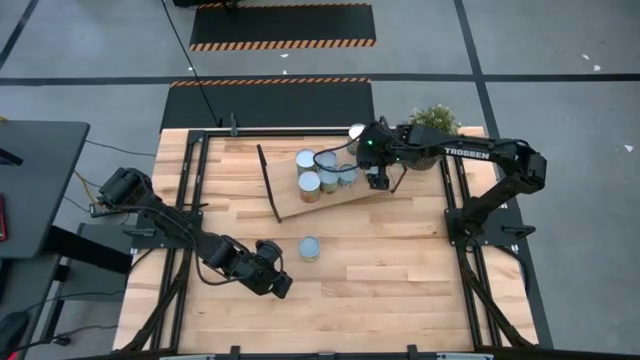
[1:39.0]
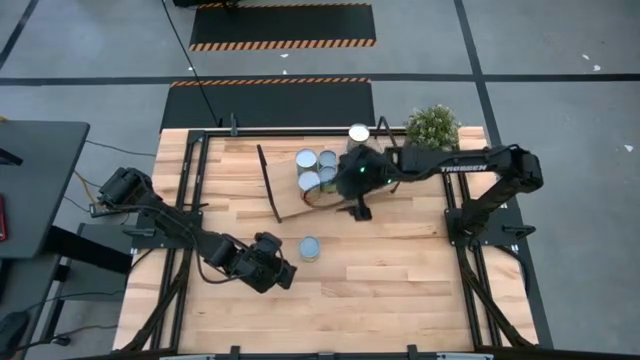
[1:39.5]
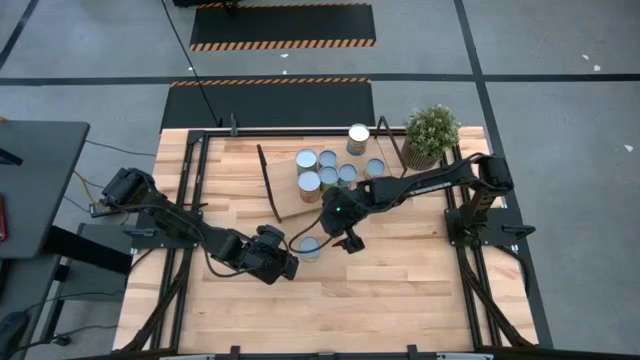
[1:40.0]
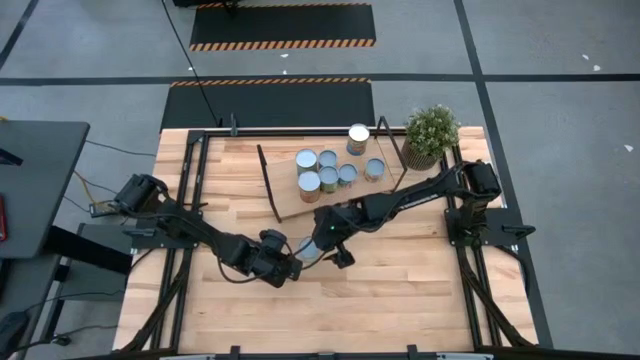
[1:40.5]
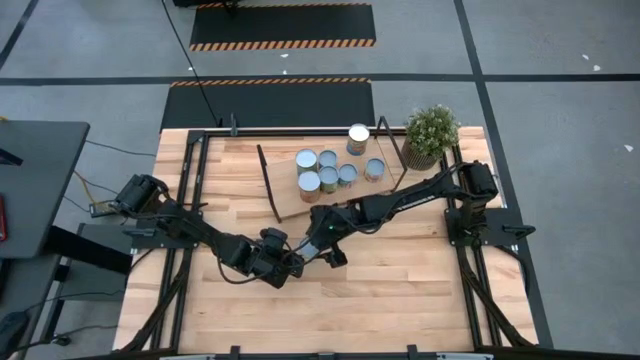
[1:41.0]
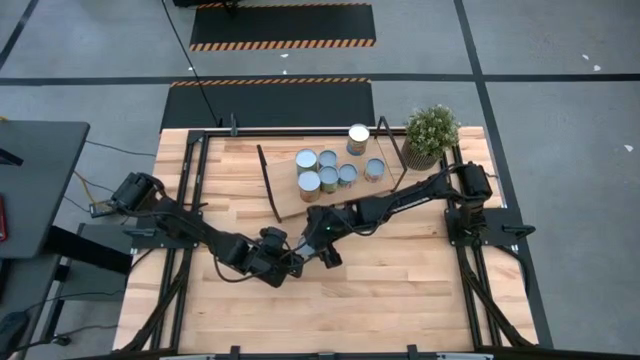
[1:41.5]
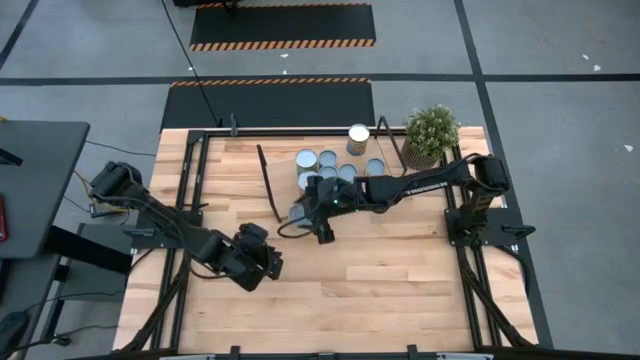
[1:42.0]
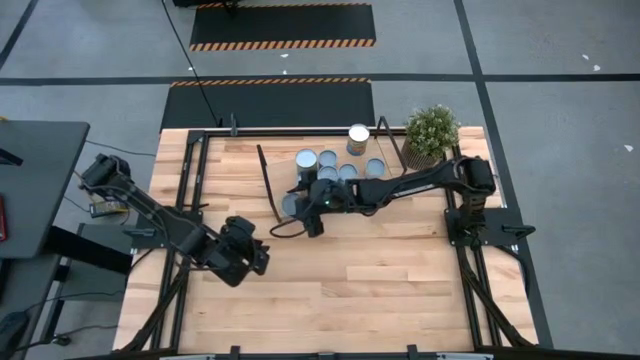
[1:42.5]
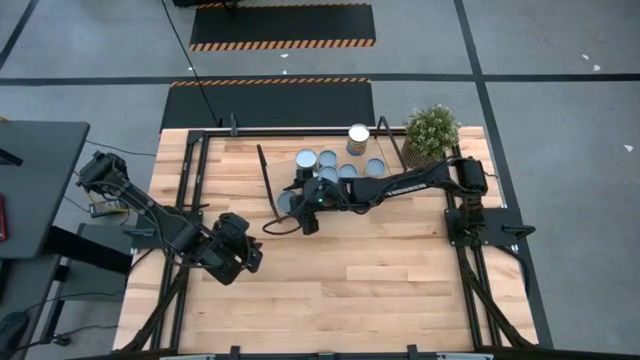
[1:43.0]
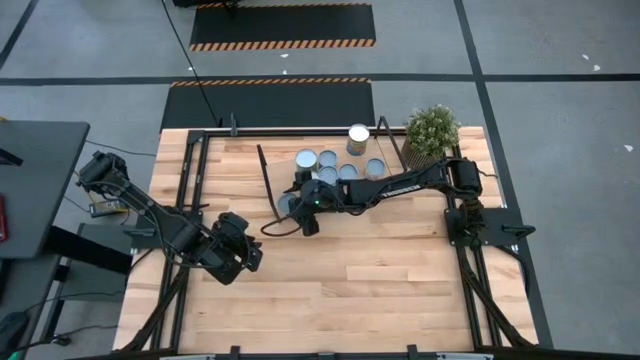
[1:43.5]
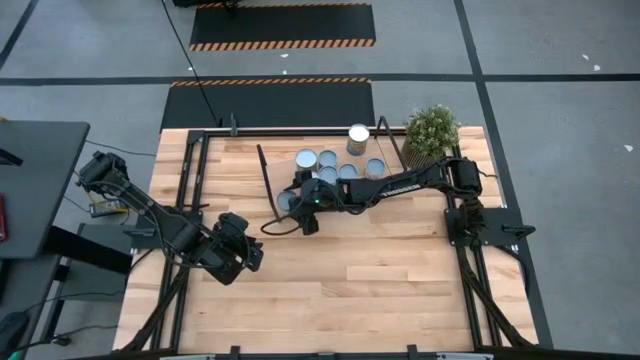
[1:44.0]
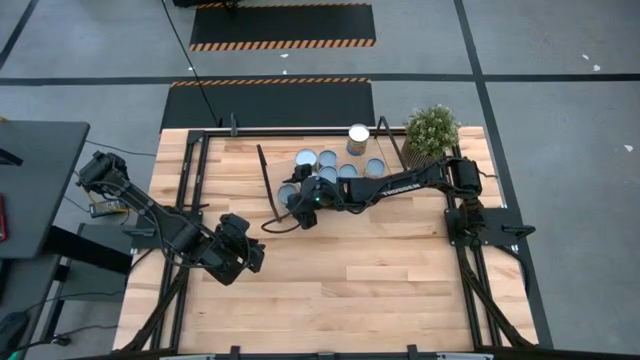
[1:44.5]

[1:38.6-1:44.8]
Task: Pick and place cans onto a shelf
Put the green can on the shelf

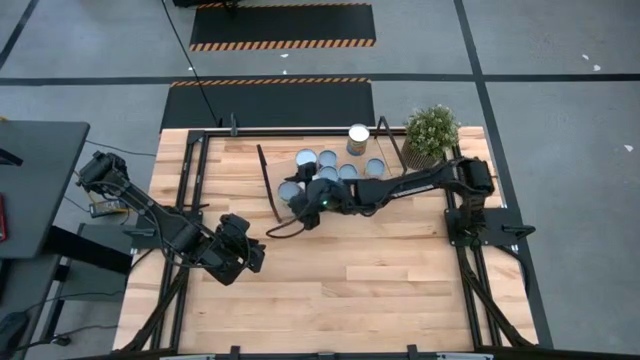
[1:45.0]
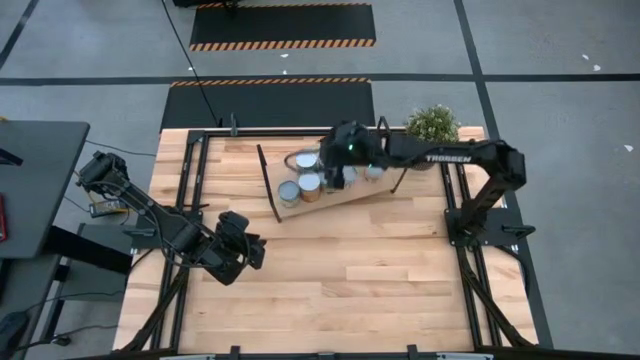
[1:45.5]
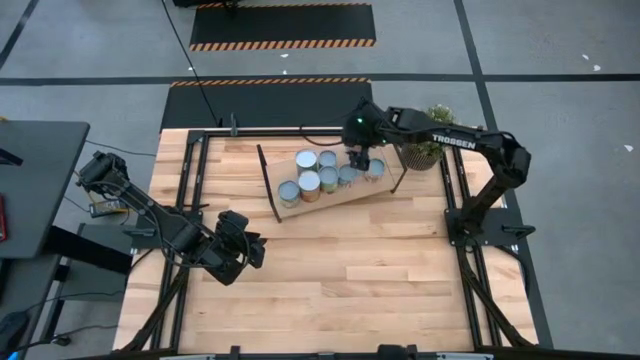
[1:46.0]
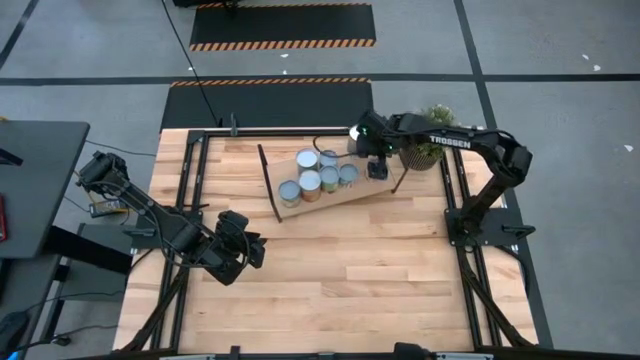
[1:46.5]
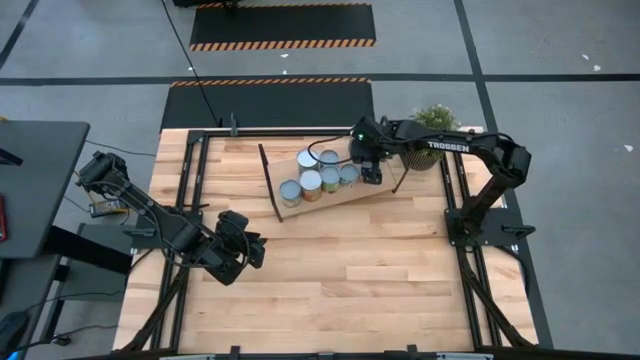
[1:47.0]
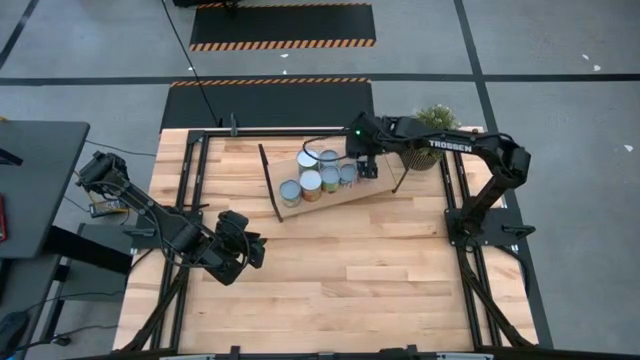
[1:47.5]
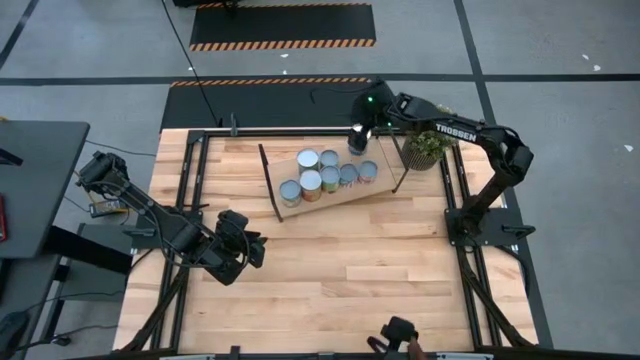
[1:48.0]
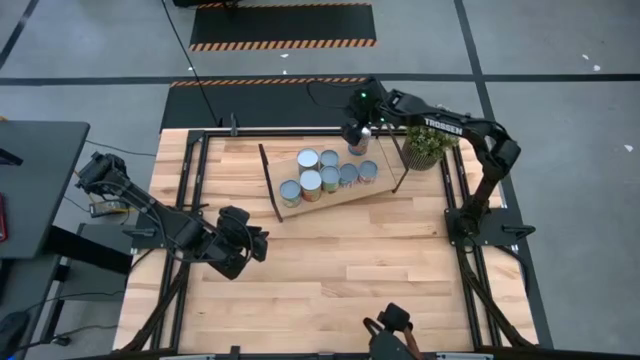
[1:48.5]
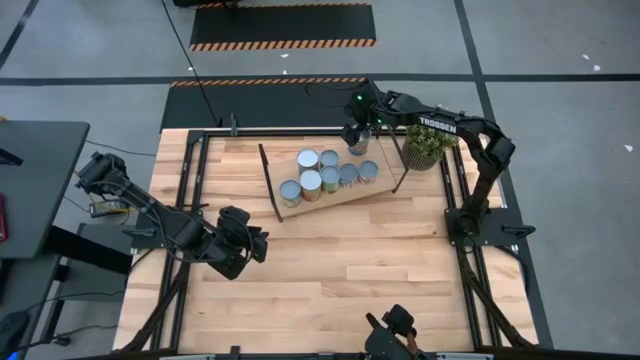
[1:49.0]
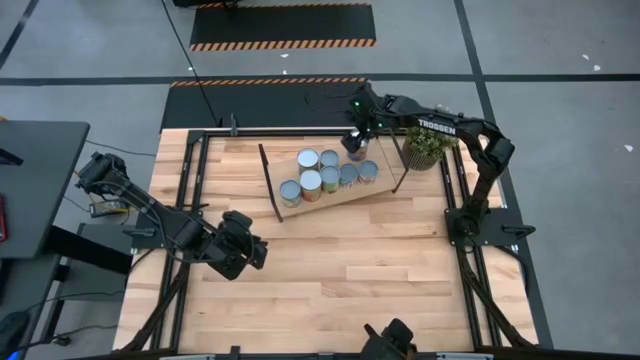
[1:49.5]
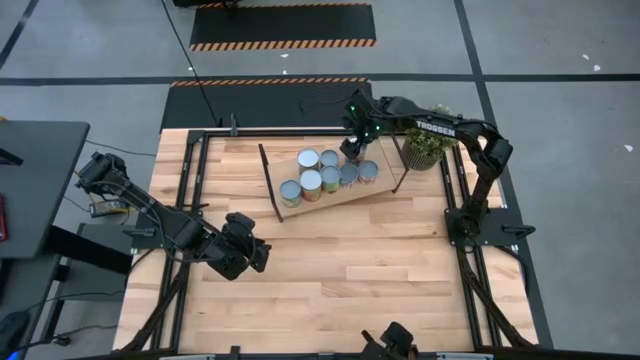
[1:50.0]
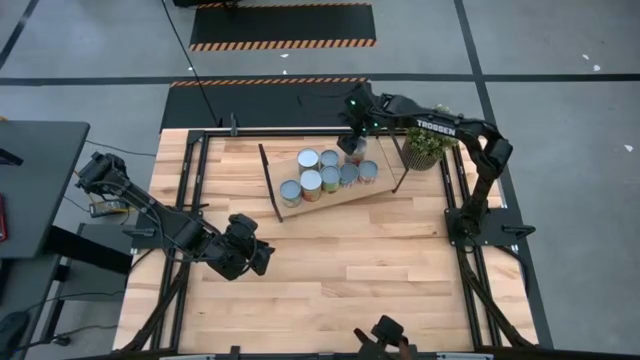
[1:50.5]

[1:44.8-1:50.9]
Adjust the cans on the shelf

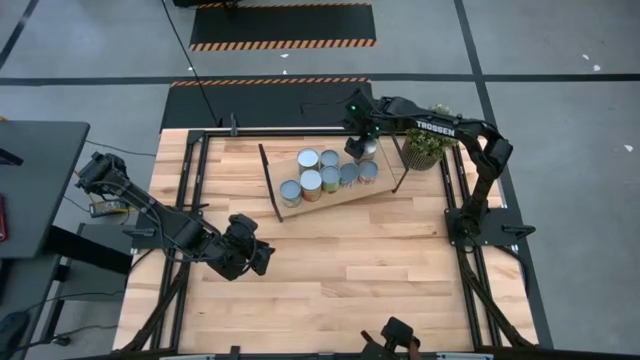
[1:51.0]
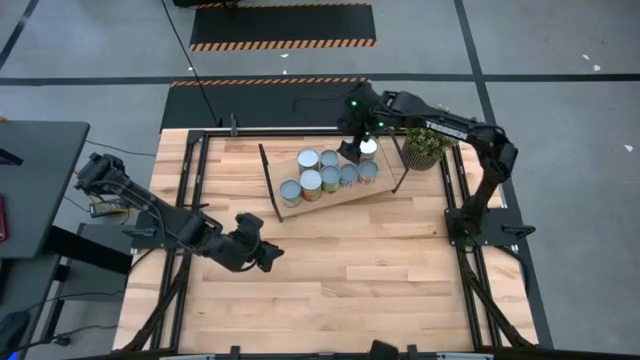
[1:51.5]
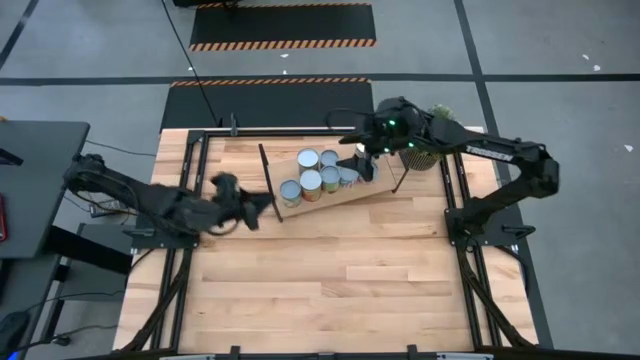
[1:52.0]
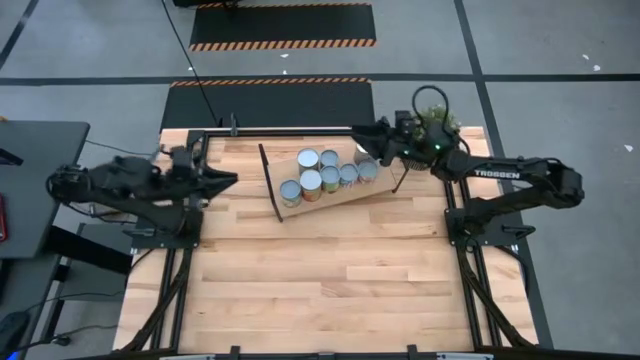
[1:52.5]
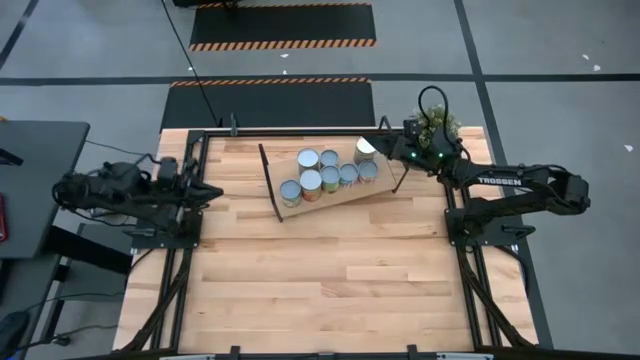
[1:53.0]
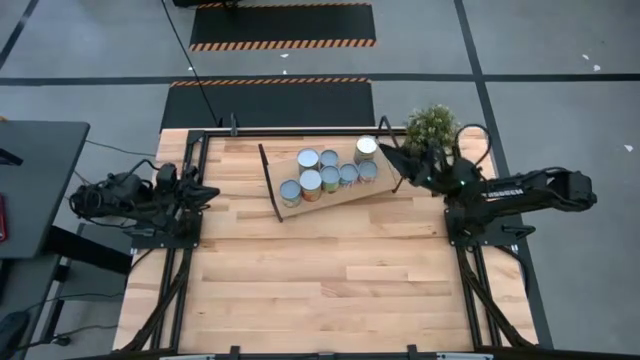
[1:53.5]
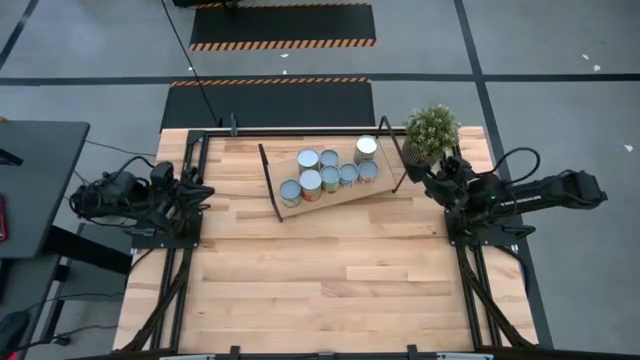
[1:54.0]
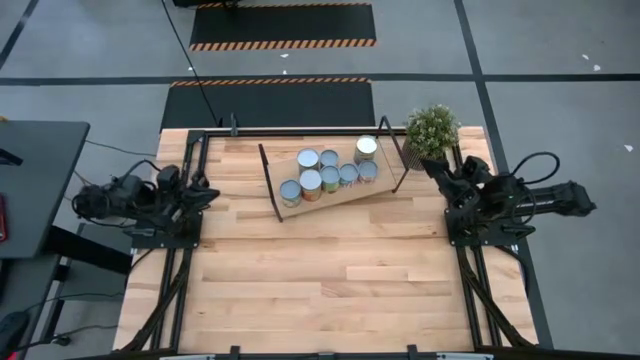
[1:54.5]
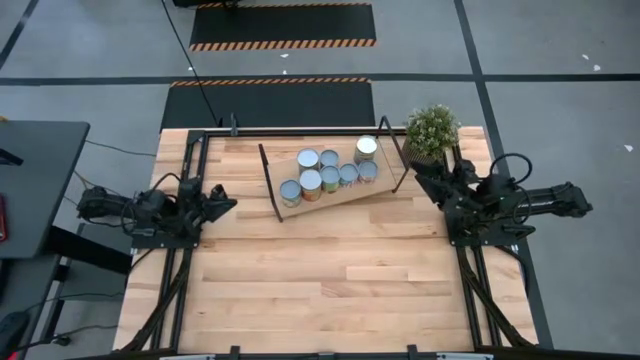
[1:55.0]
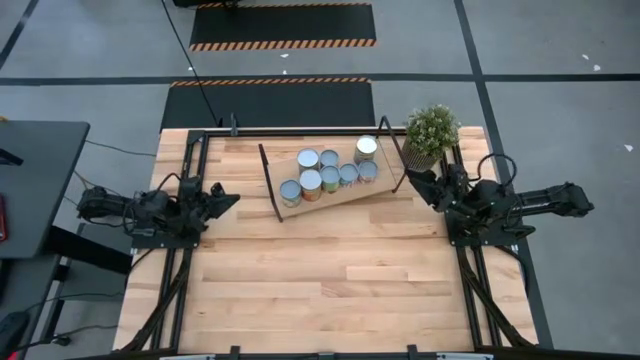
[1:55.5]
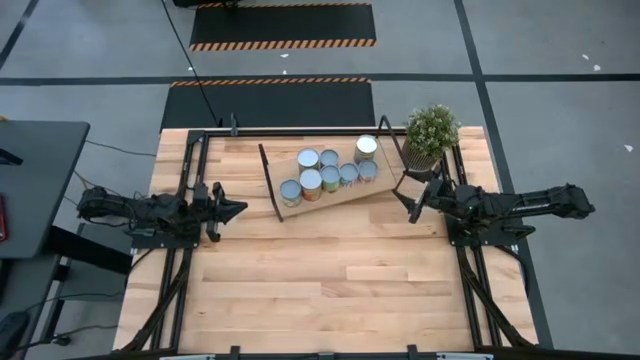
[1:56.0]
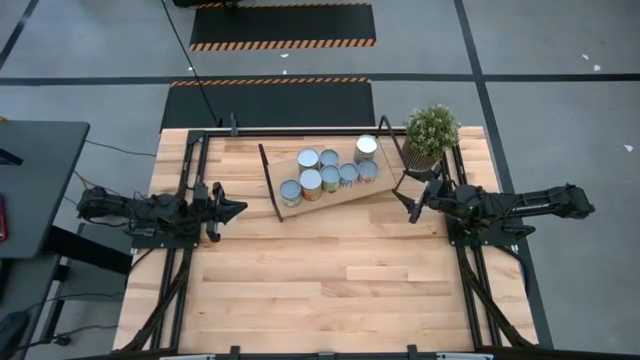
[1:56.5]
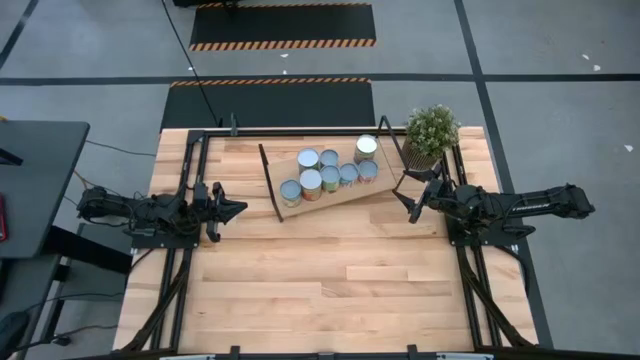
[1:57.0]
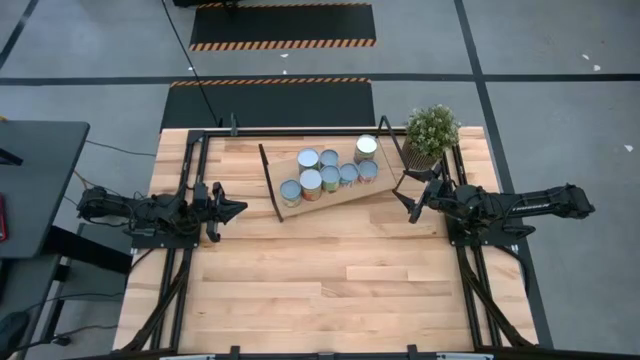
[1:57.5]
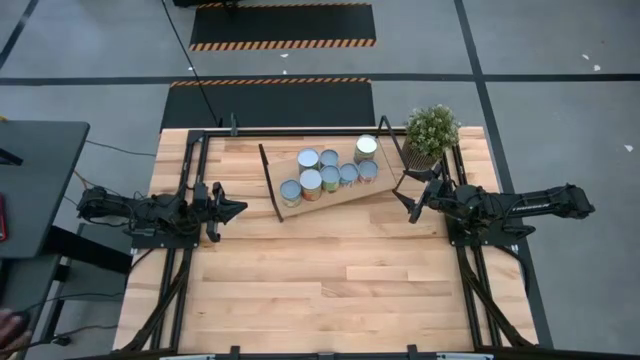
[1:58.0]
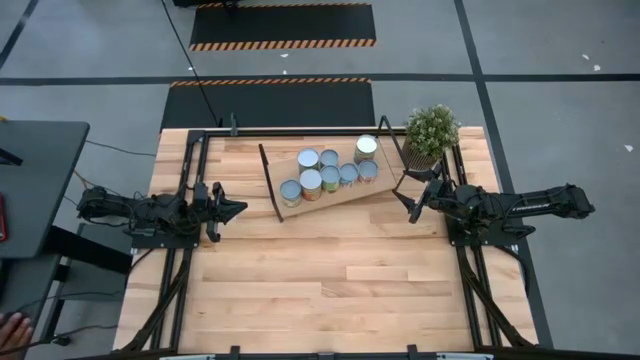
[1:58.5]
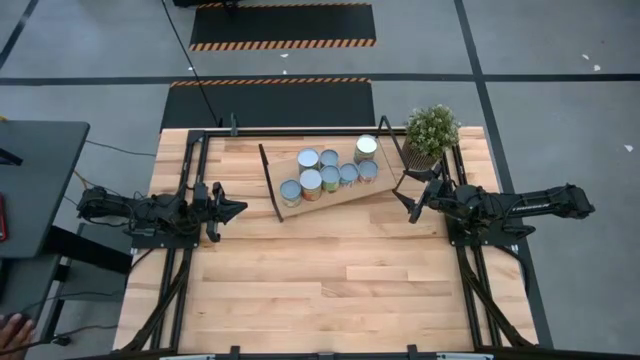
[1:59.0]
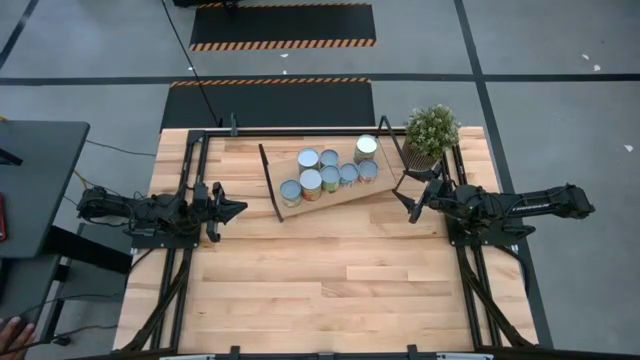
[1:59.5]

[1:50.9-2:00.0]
Return to Home Position
